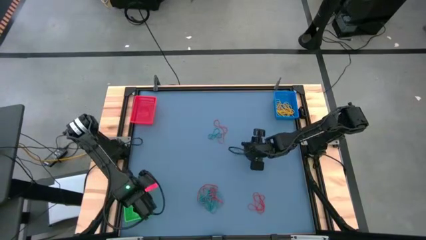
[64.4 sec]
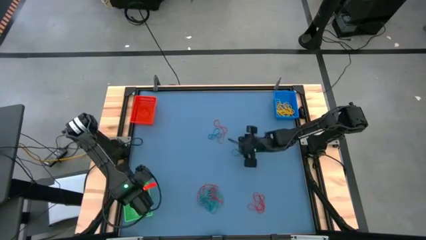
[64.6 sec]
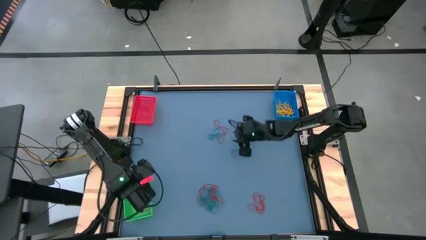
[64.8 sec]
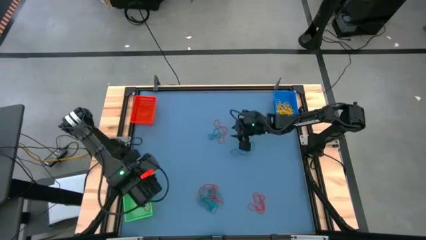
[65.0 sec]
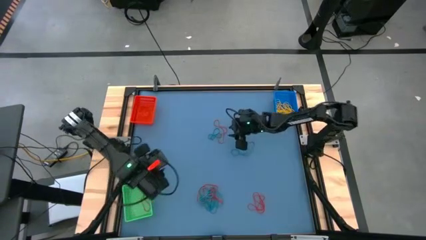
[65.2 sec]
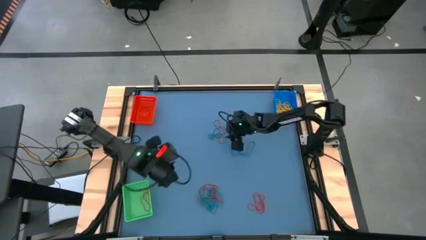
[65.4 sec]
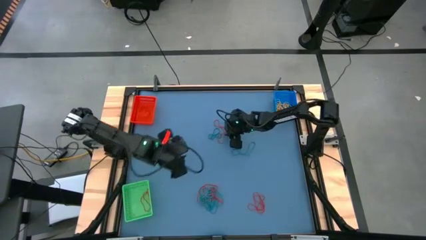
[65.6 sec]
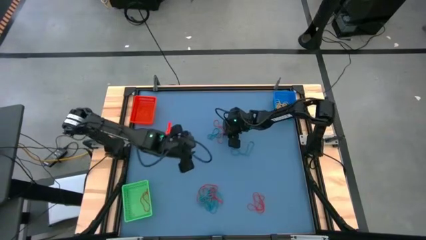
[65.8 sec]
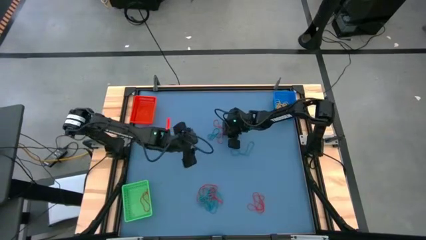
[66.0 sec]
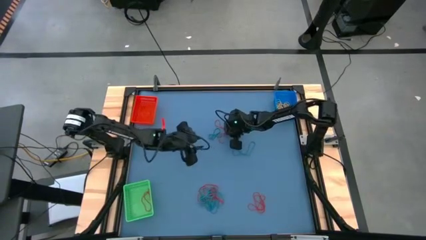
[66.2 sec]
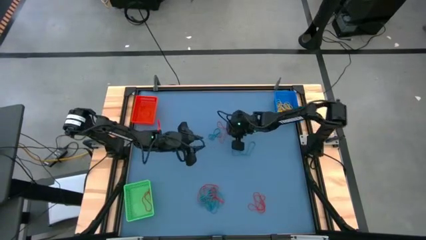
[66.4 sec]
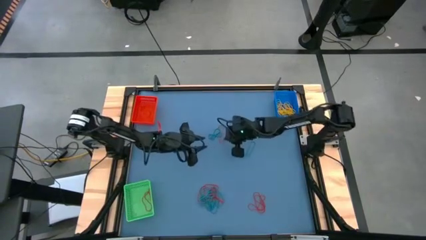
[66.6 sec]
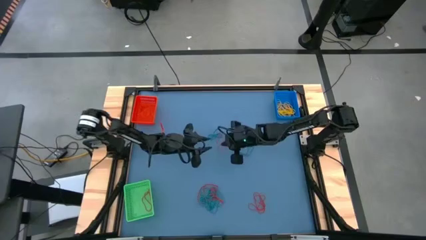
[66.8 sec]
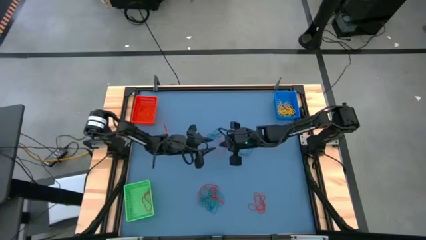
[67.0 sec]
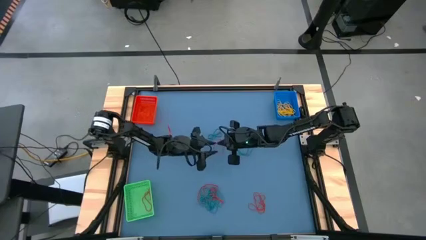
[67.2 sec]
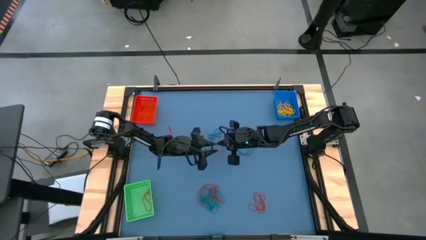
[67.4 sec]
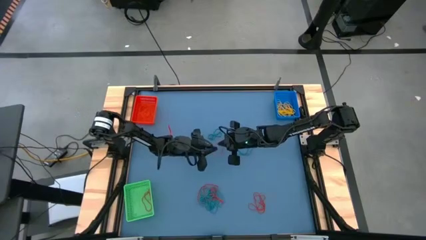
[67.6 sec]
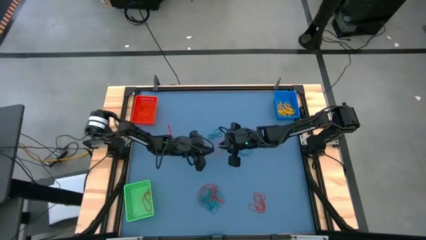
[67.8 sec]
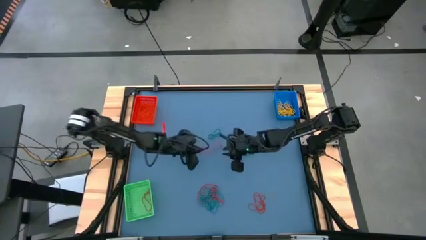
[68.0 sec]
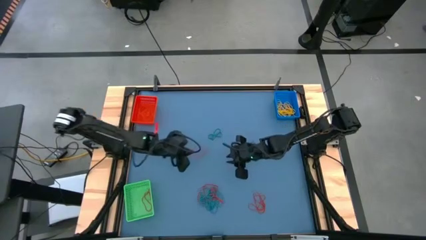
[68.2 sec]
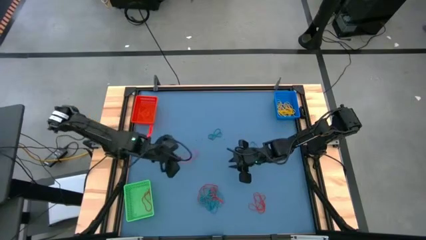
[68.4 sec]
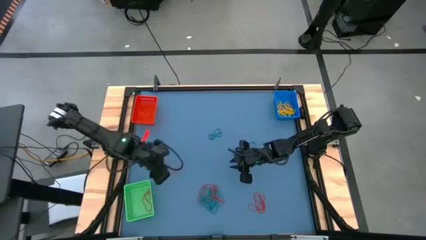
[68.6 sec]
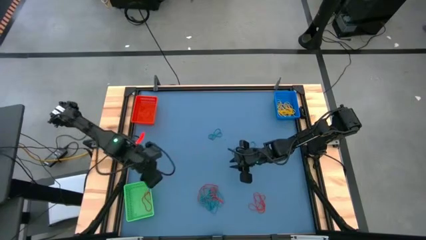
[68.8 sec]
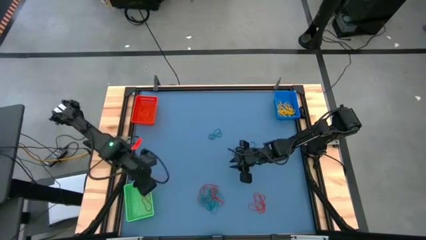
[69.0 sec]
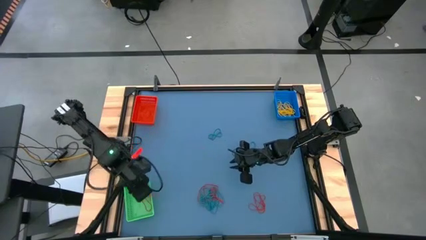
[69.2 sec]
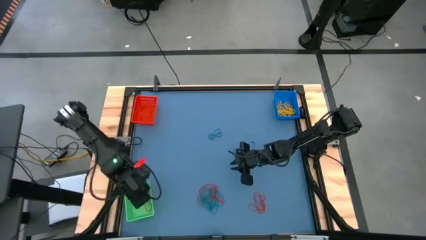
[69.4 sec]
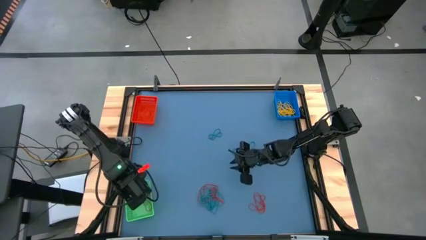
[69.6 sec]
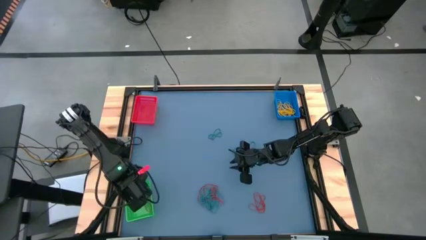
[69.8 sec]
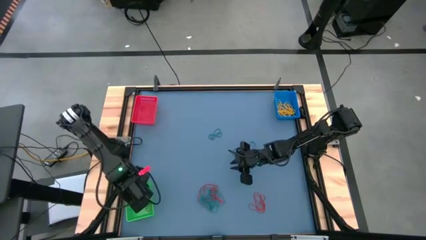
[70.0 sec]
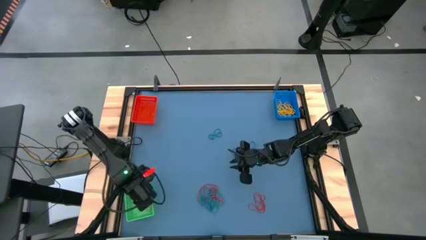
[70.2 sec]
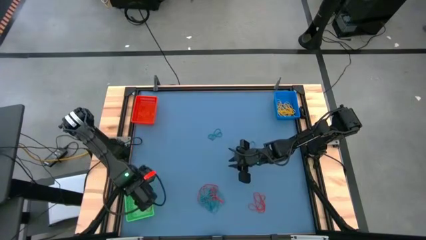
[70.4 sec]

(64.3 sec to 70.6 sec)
Task: Sort rubber bands into baskets
Put the red rubber band into the green basket

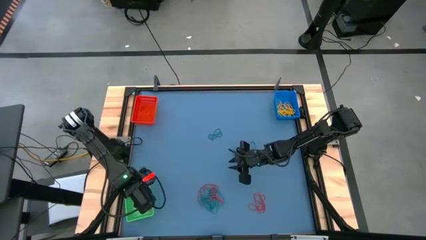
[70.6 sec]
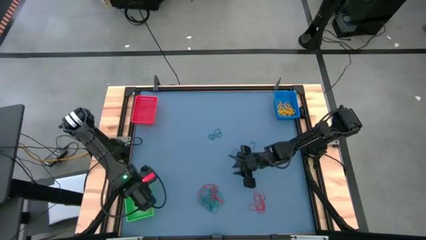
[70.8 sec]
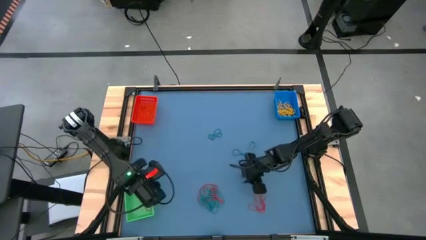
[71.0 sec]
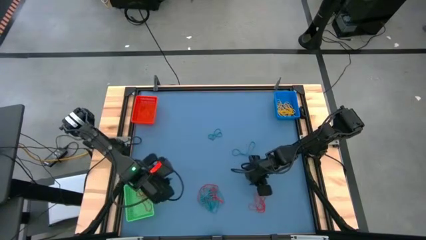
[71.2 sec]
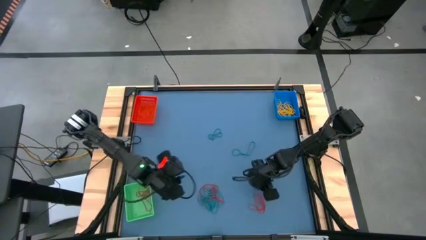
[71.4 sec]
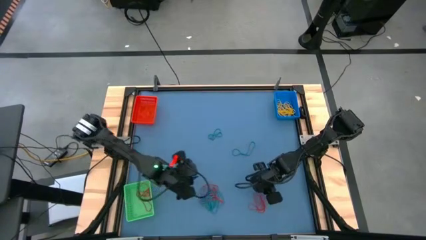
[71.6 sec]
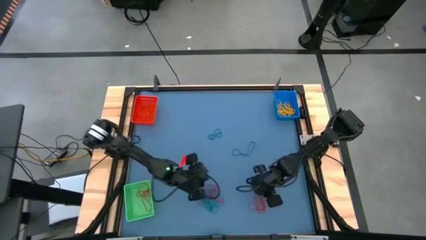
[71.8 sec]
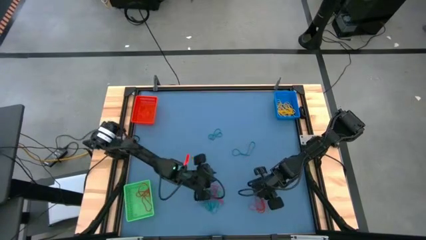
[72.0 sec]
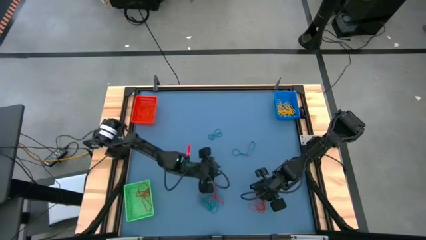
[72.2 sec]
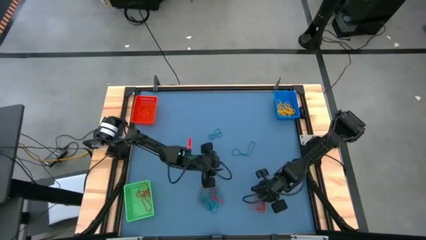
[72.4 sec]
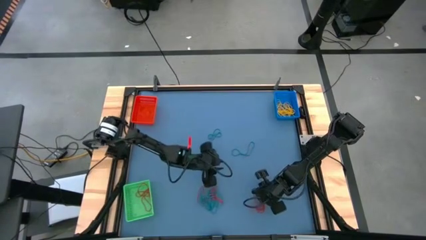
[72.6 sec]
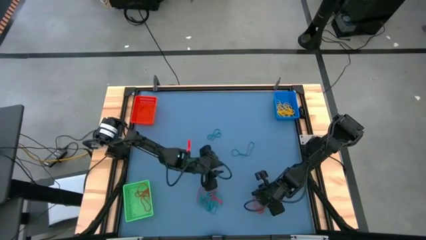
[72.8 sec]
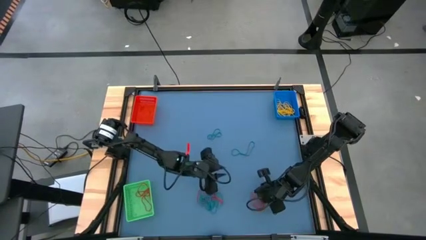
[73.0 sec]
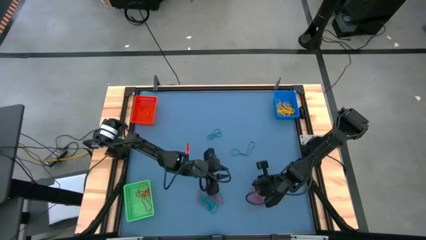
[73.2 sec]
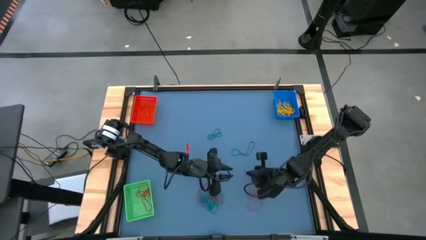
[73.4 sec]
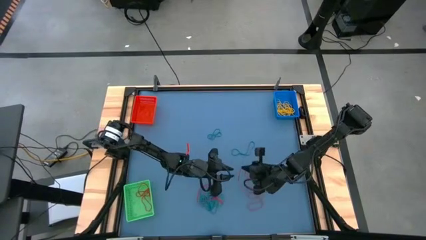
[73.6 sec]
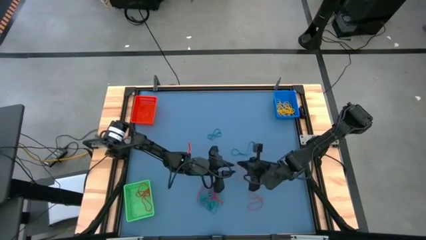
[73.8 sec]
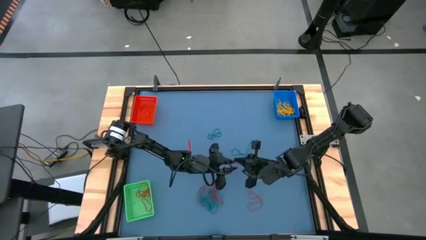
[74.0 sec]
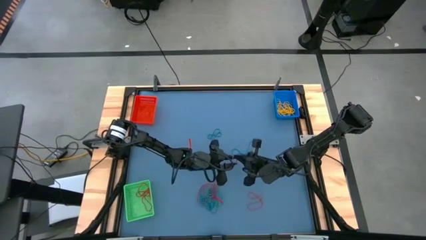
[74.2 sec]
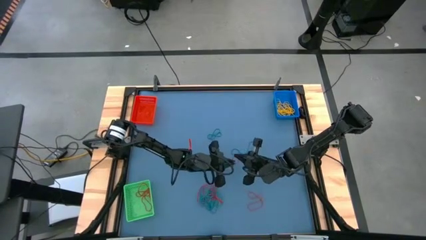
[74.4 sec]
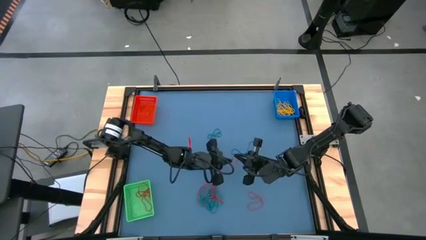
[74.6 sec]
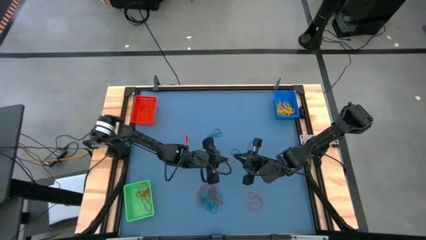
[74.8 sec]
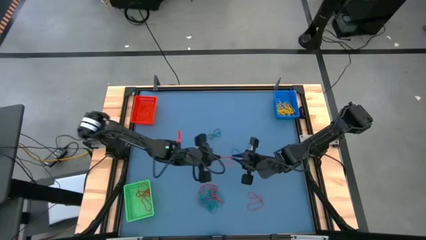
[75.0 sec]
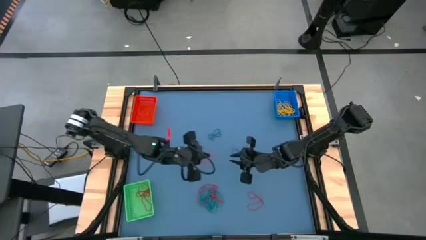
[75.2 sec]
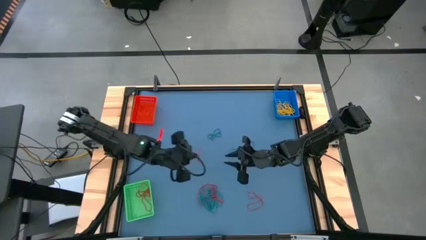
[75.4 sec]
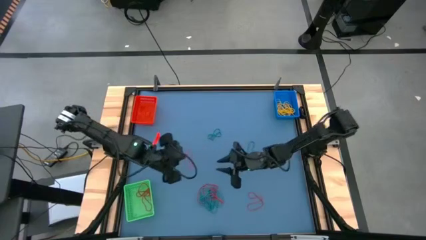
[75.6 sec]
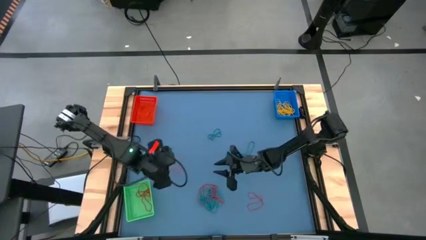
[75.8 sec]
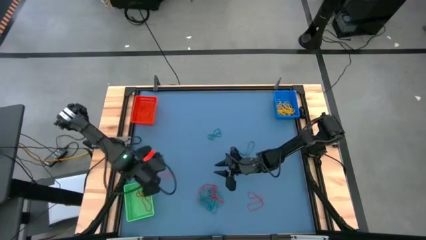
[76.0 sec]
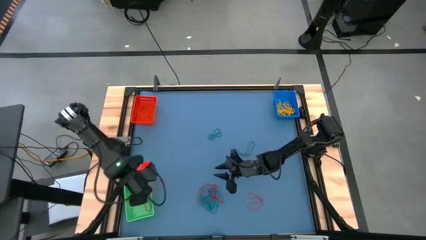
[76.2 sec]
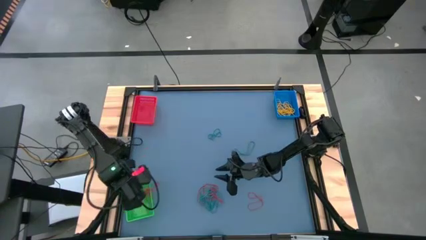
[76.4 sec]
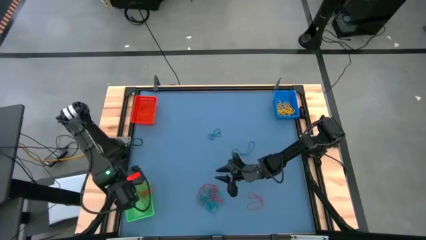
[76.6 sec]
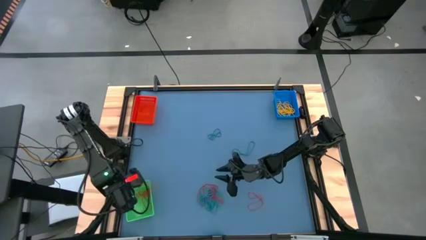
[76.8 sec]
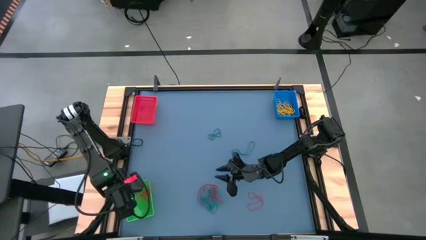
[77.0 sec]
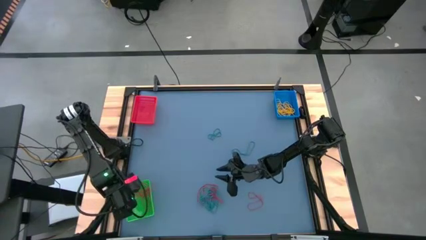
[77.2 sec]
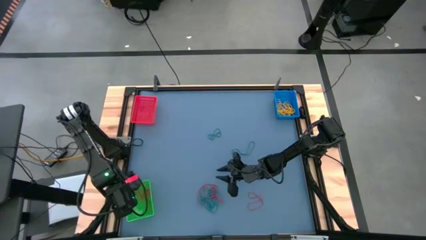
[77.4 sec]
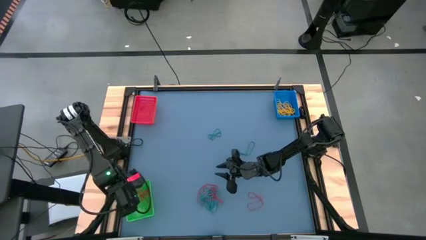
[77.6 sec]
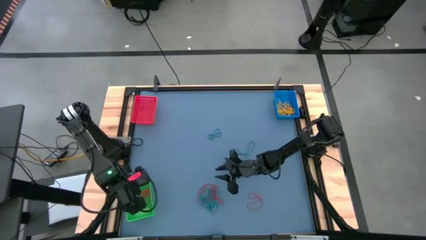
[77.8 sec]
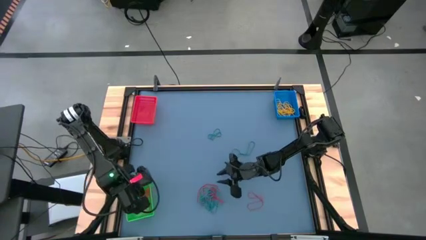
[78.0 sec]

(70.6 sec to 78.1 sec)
Put the red rubber band into the green basket

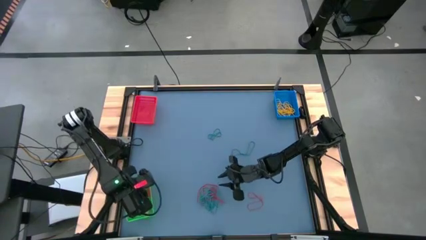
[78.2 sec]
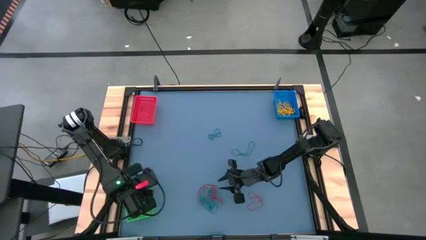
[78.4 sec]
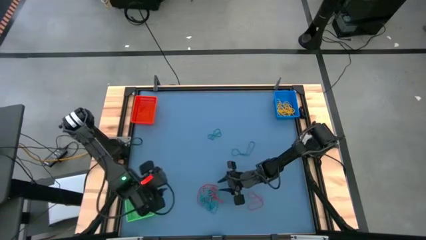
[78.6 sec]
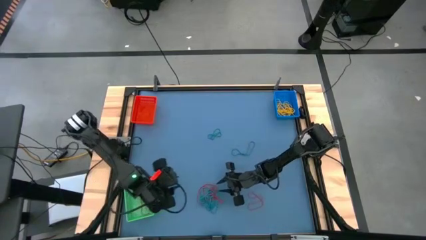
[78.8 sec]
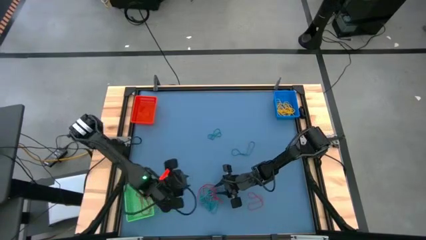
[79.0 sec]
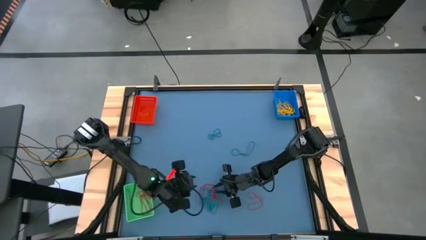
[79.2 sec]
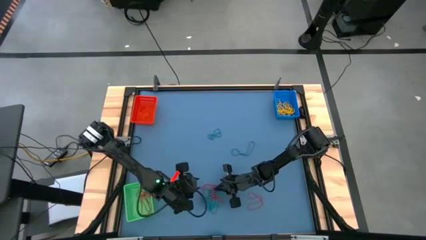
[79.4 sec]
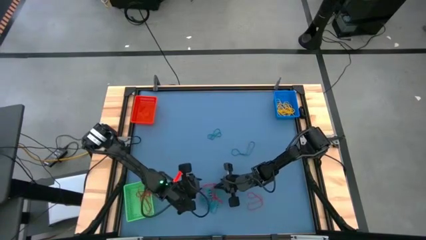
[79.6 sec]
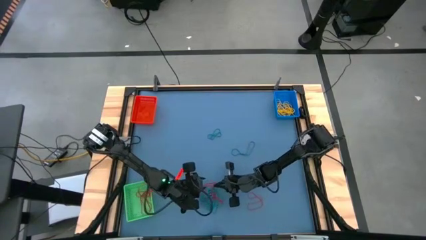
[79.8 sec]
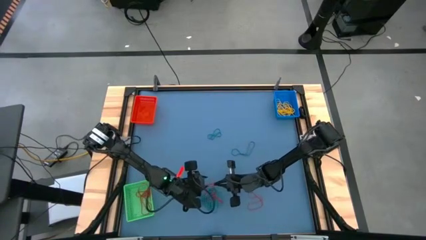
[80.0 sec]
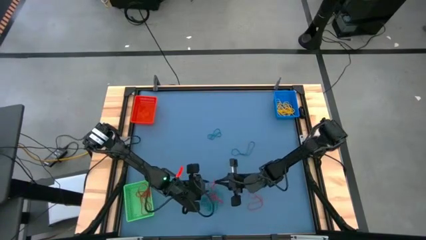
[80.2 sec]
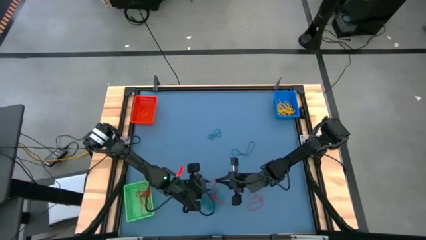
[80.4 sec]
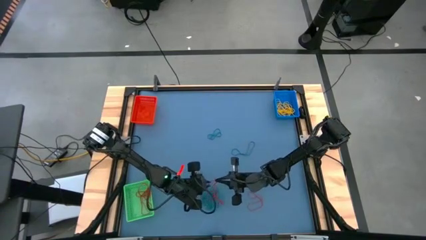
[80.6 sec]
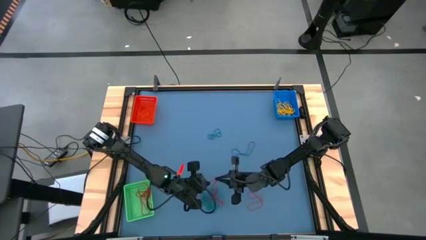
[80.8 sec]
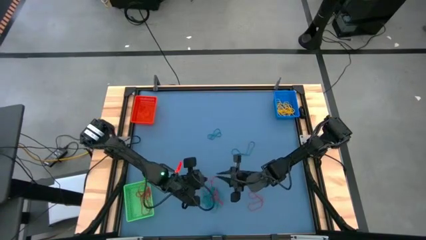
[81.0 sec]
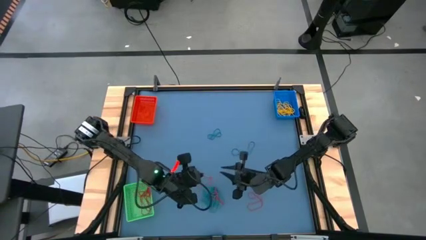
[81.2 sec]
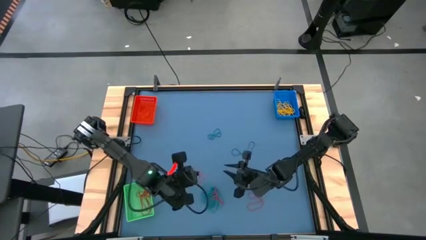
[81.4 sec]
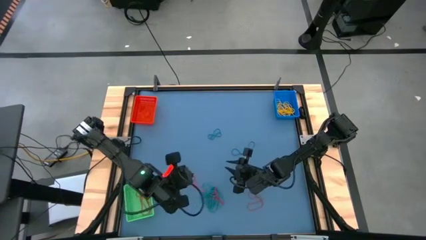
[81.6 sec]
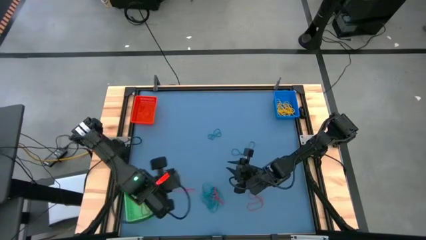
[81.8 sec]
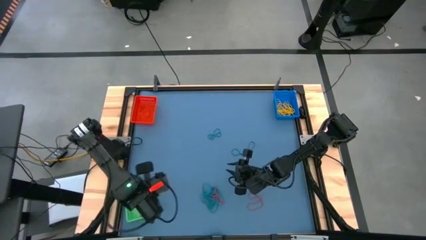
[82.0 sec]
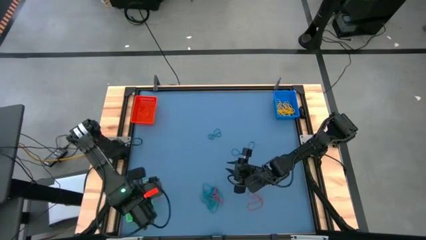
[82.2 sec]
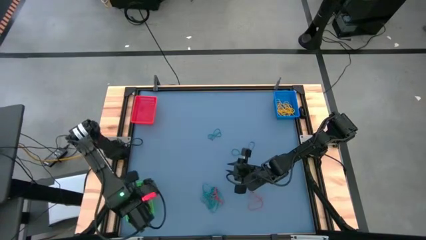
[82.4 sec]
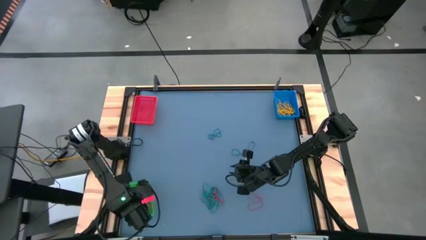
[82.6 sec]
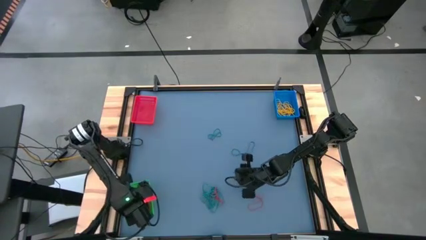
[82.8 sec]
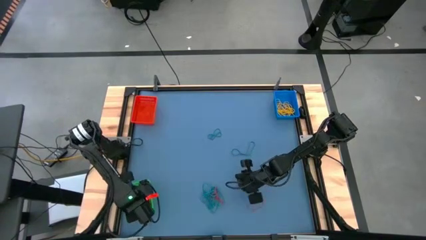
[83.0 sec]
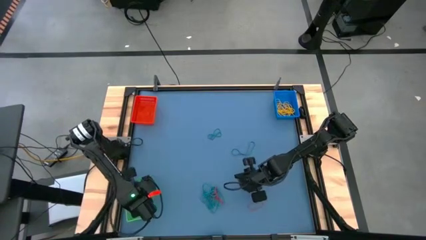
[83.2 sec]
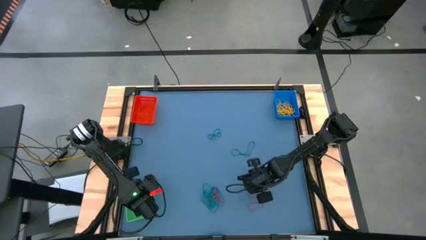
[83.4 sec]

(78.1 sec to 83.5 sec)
Put the red rubber band into the green basket
